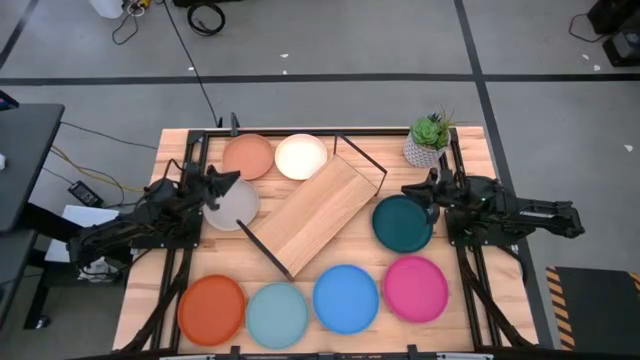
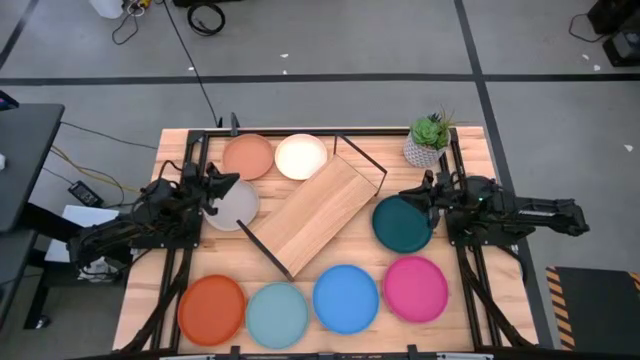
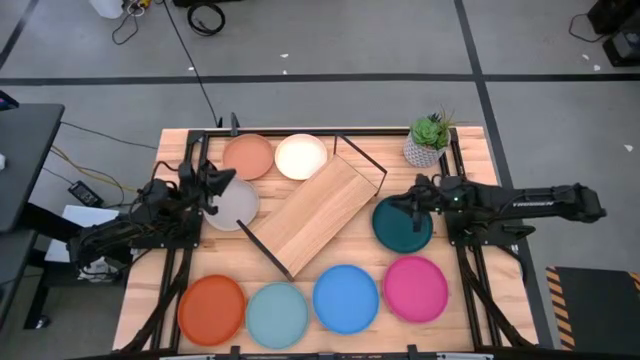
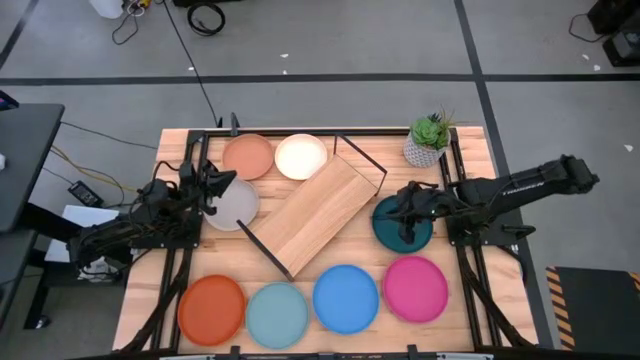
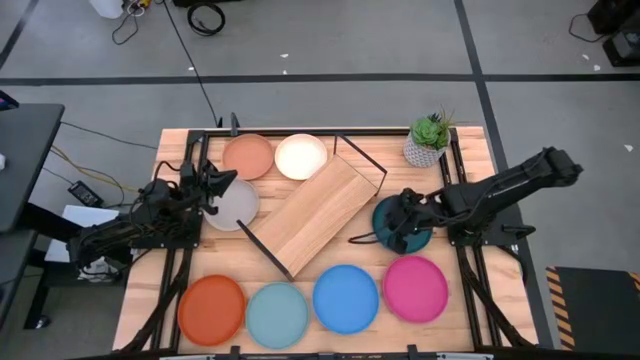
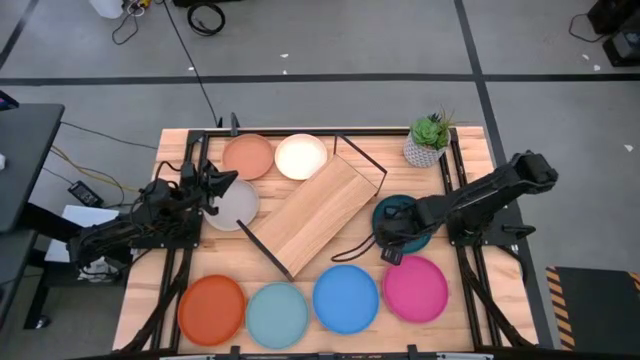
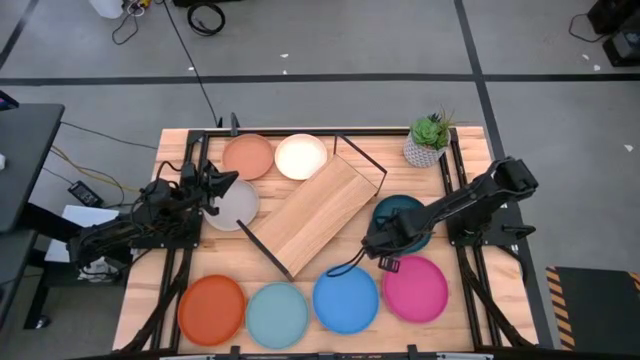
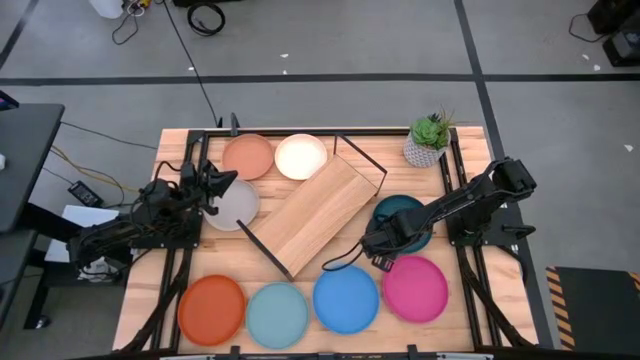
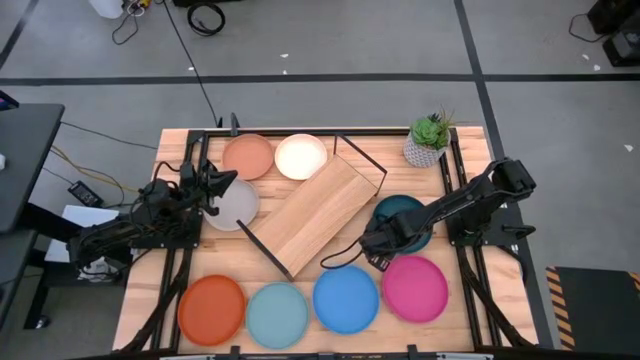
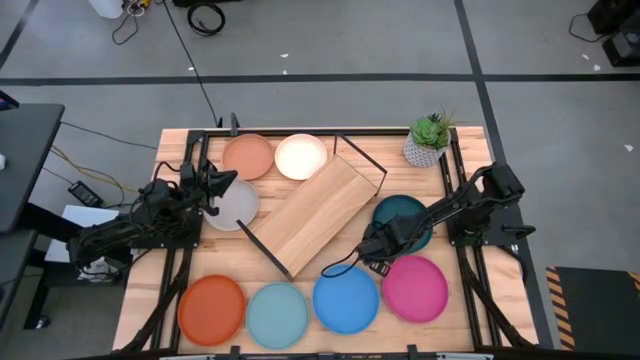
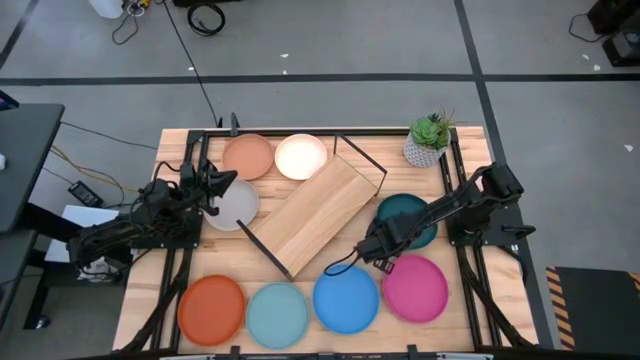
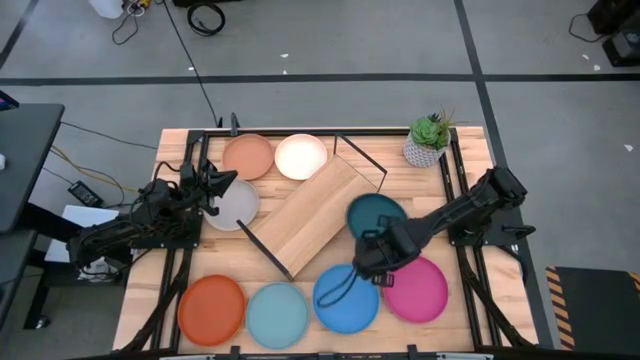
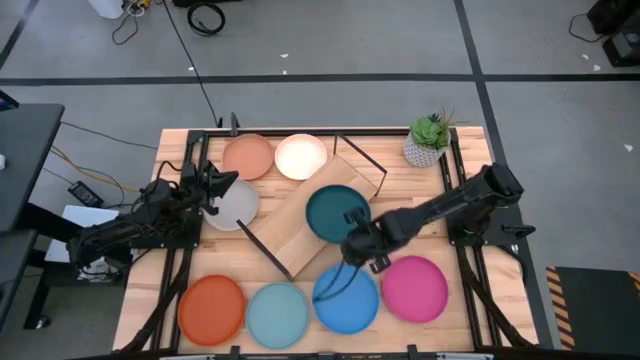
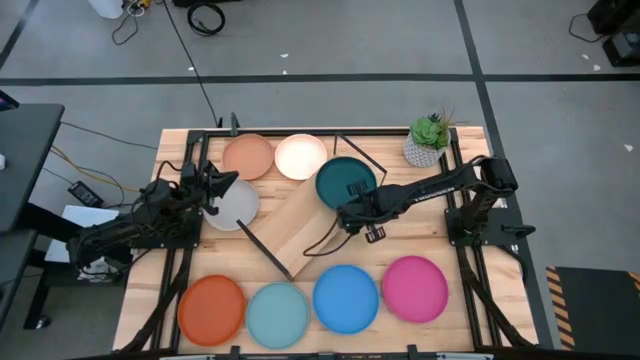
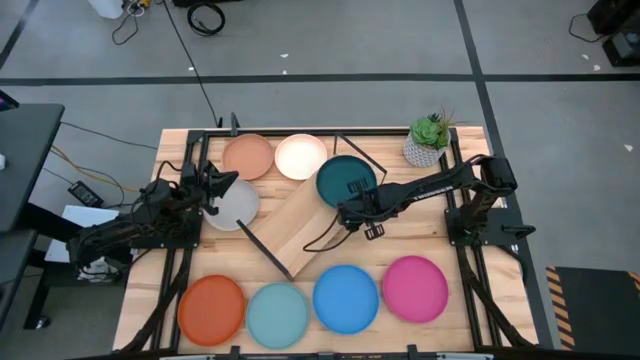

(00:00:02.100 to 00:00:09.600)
Task: Place and stack plates onto a shelf
Put the dark green plate on the shelf

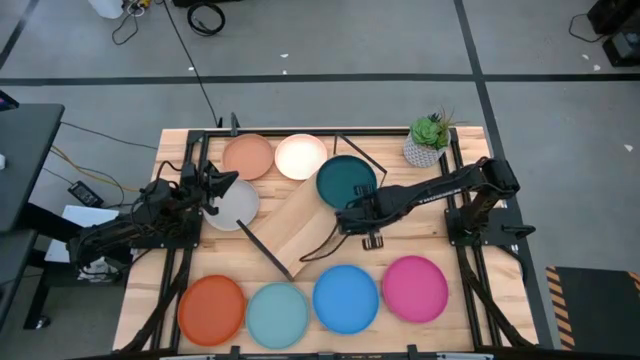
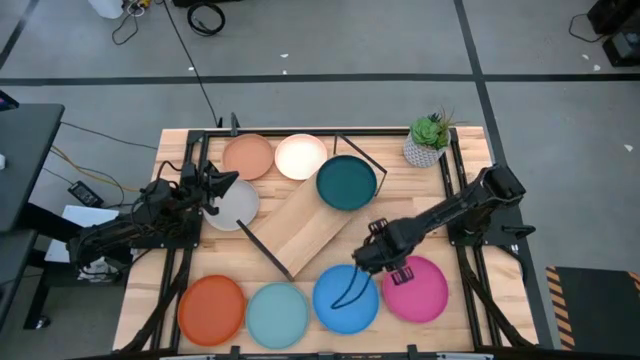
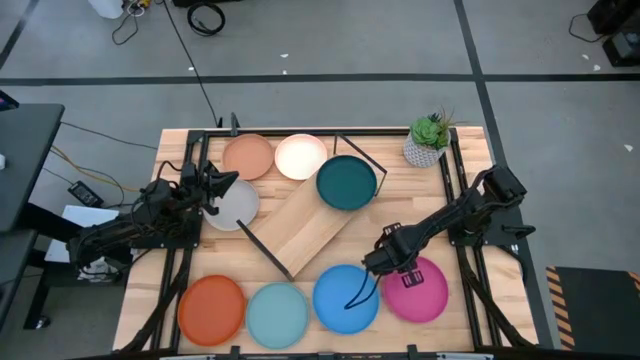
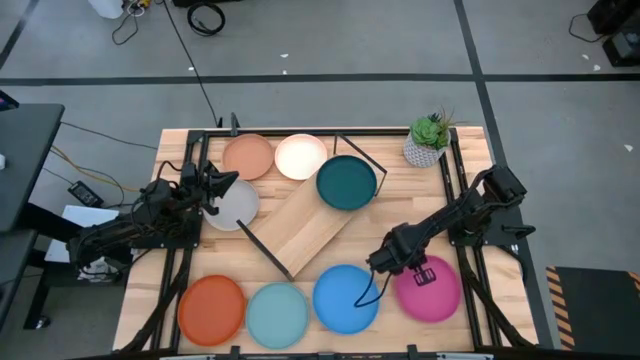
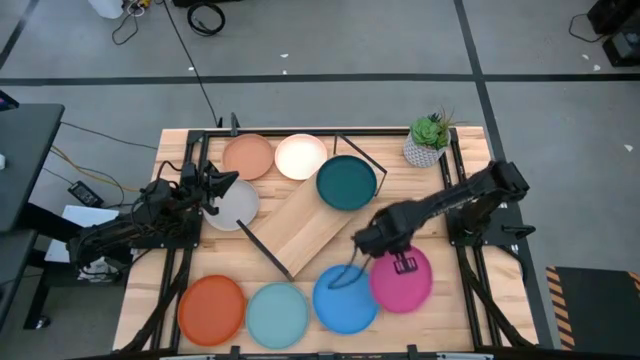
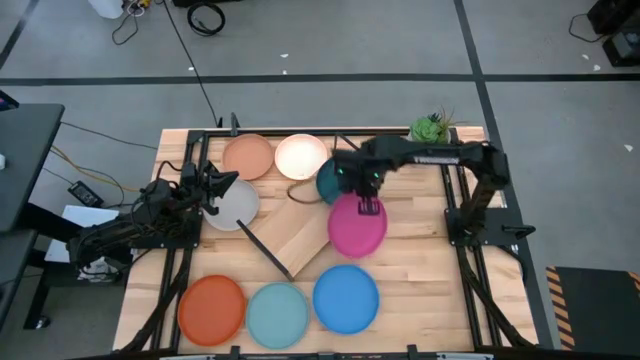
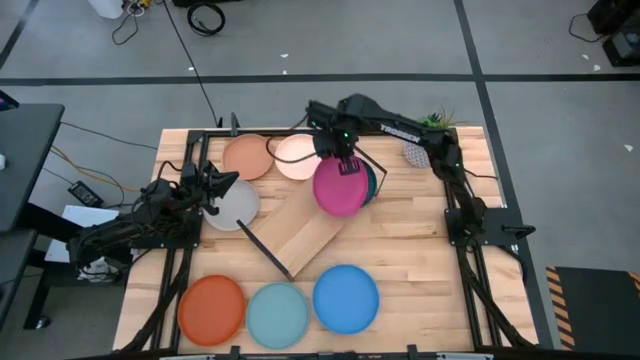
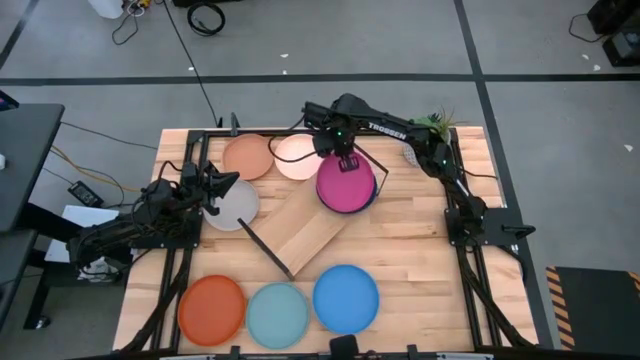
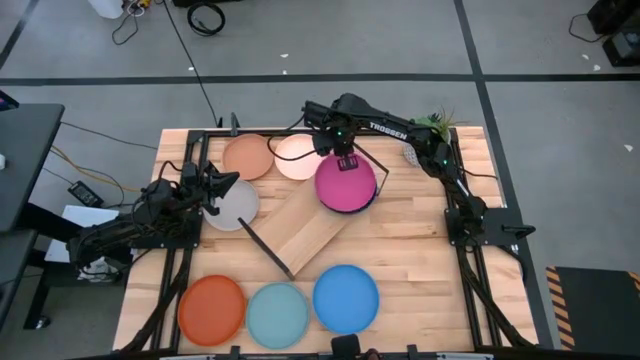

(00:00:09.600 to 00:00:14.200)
Stack the pink plate on top of the dark green plate

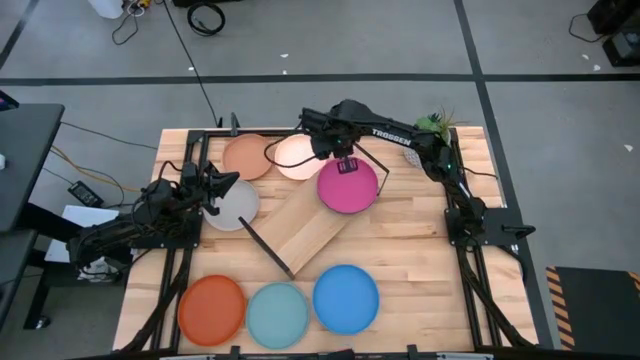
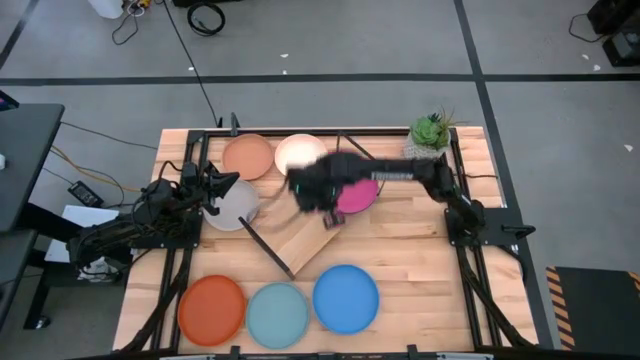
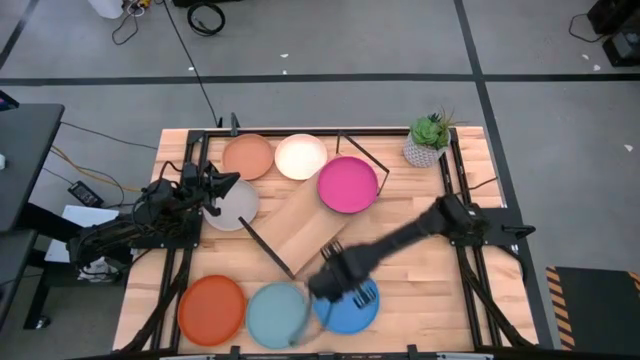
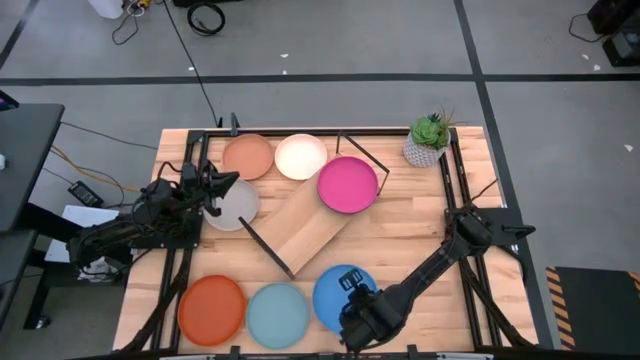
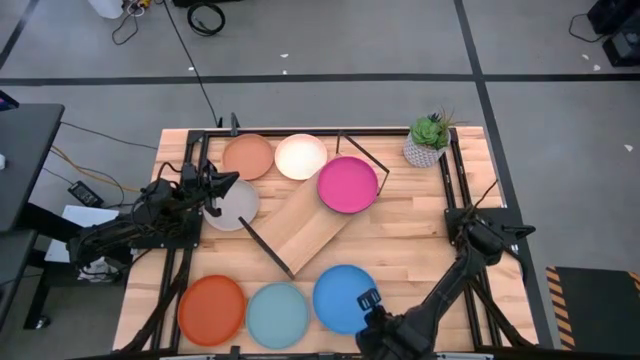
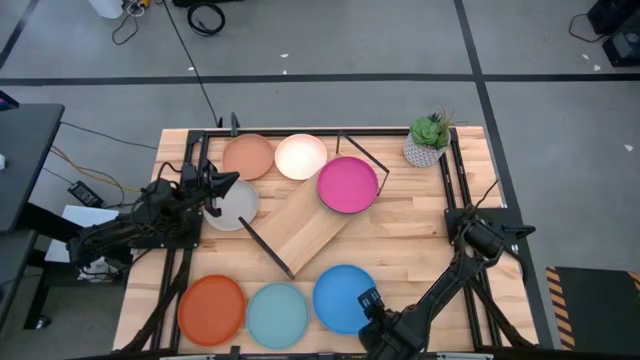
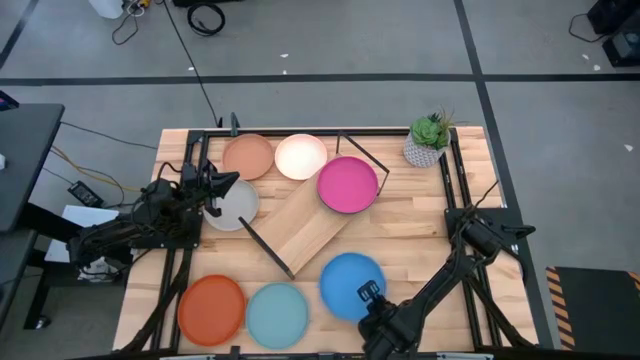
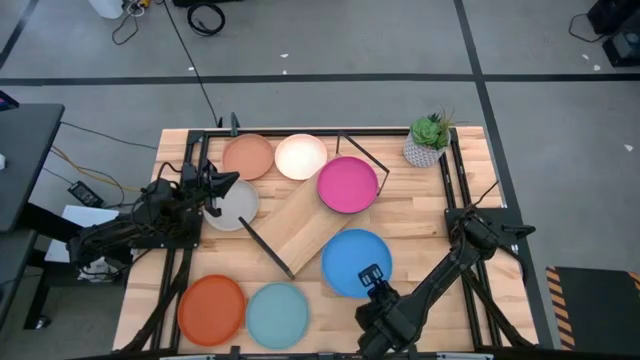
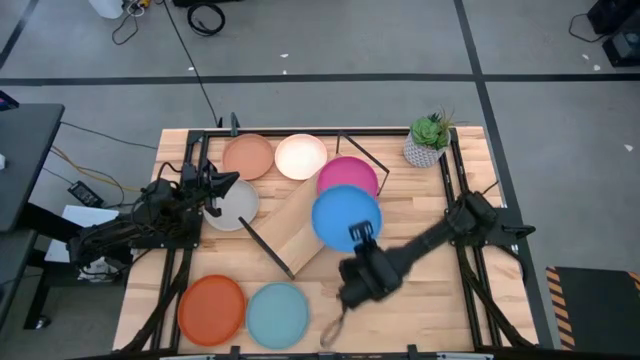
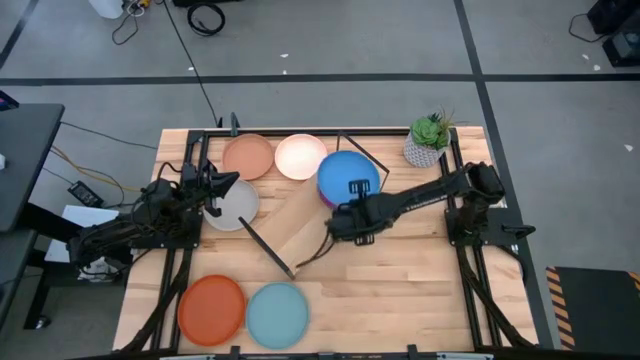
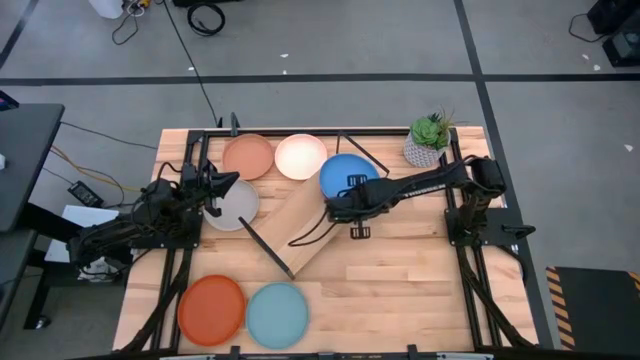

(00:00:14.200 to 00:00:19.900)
Stack the blue plate on top of the pink plate

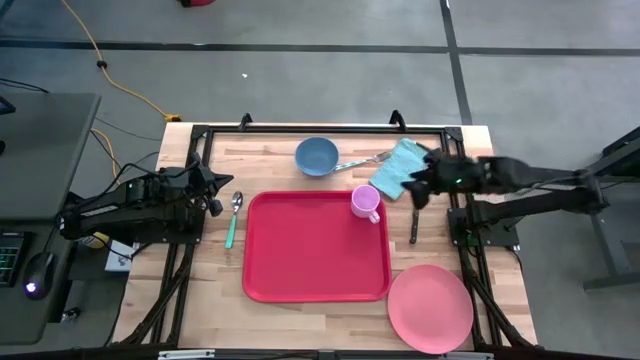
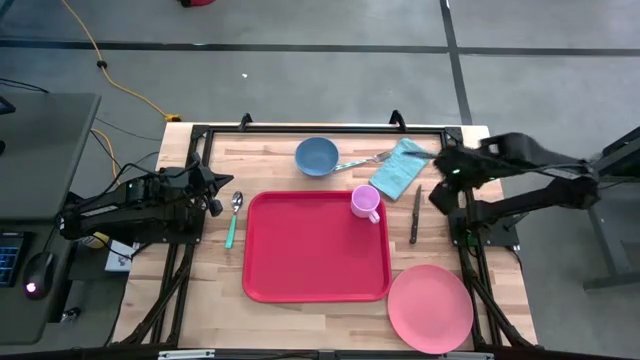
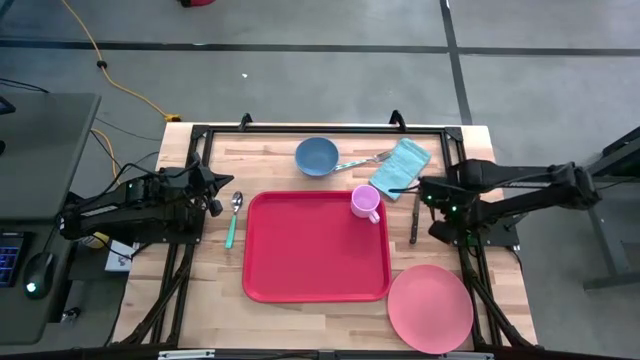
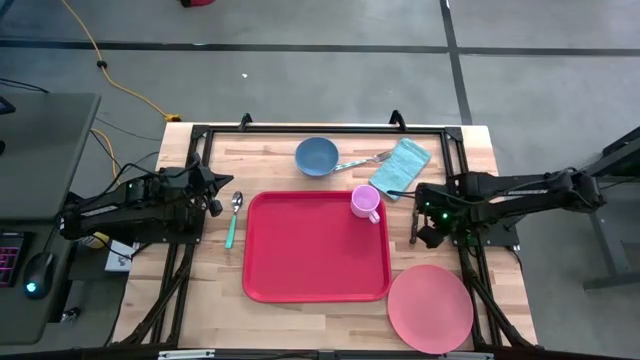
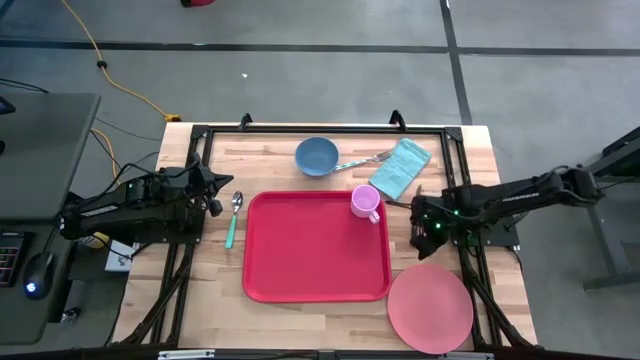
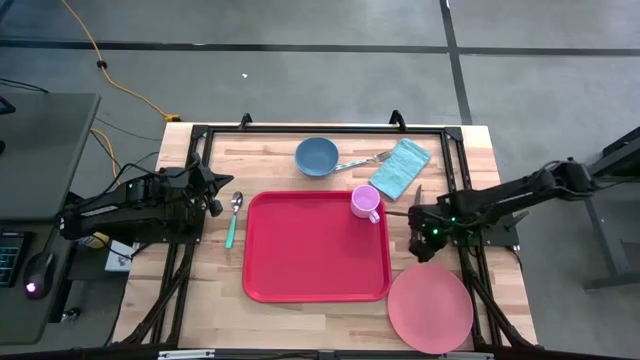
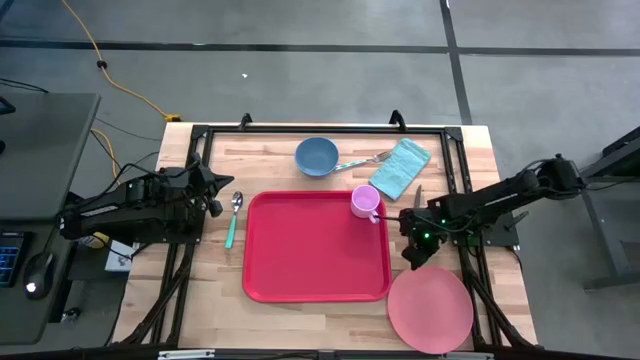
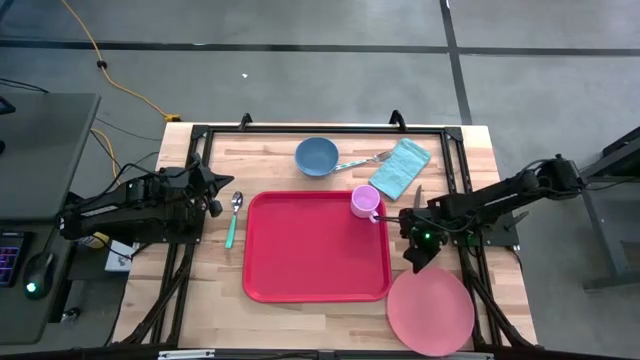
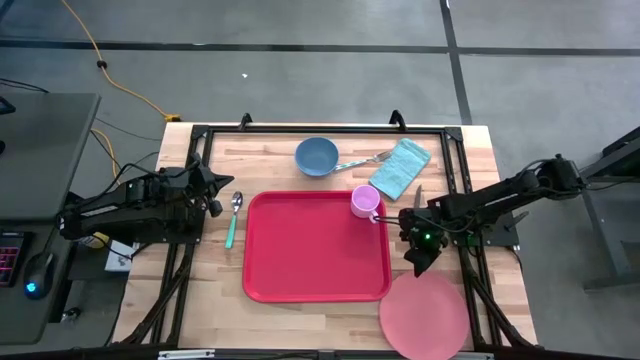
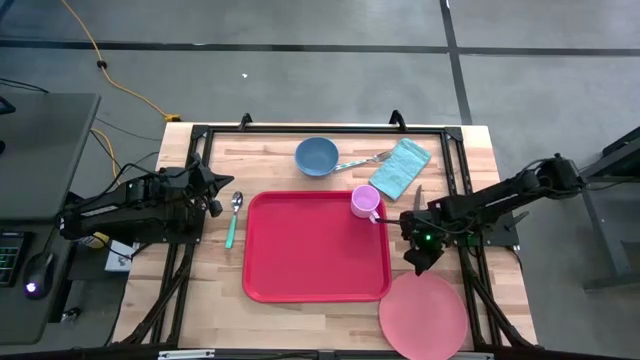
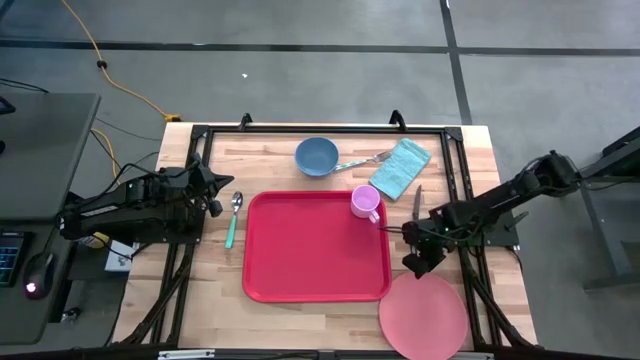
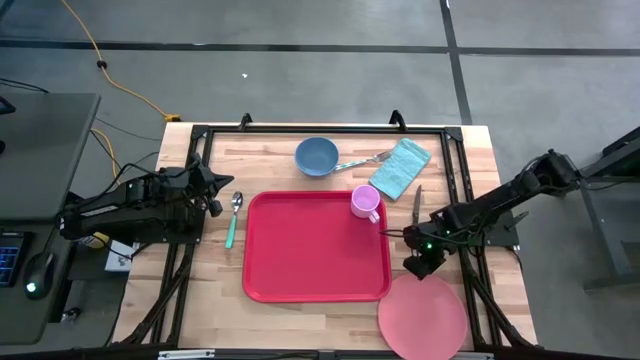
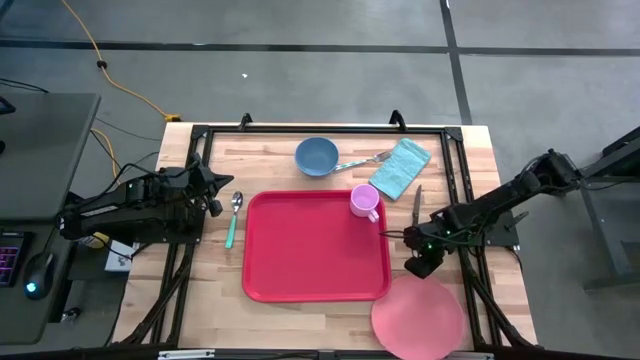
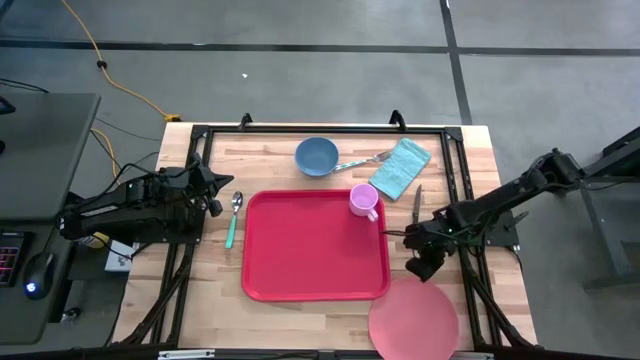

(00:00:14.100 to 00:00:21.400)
Task: Set up tray
Put the pink plate on the red serving tray below the purple coffee mug
